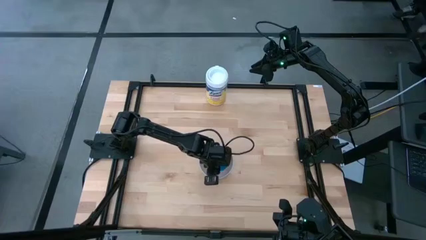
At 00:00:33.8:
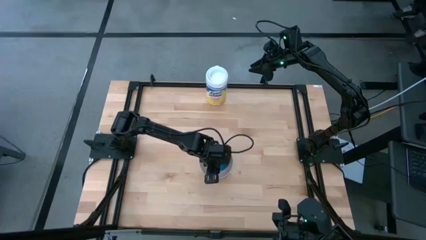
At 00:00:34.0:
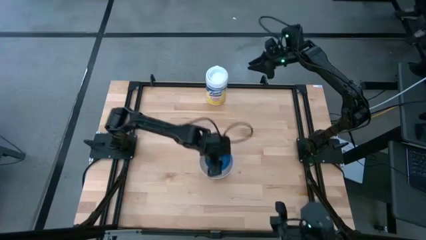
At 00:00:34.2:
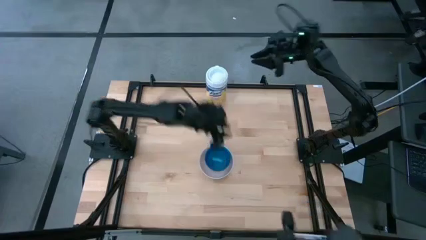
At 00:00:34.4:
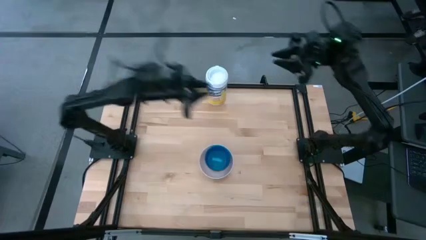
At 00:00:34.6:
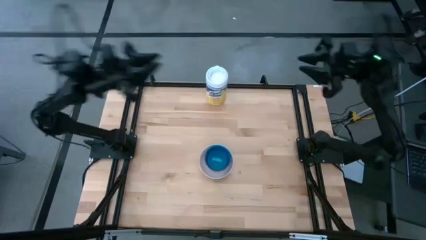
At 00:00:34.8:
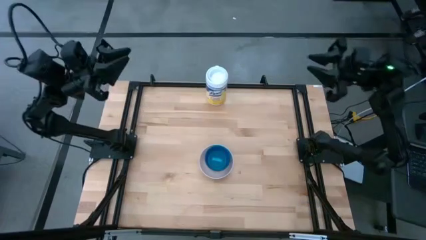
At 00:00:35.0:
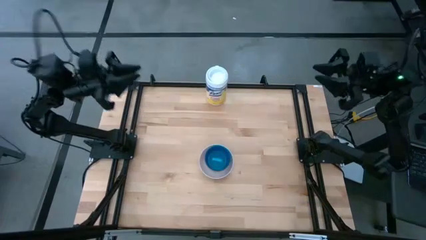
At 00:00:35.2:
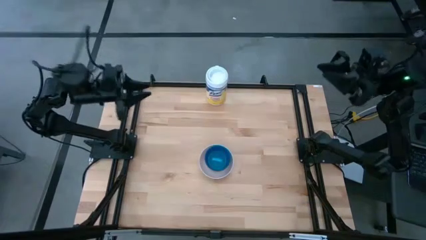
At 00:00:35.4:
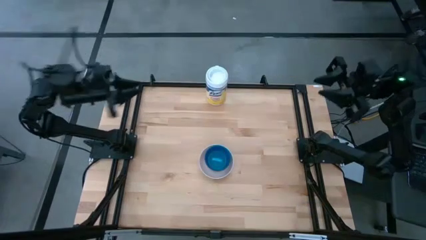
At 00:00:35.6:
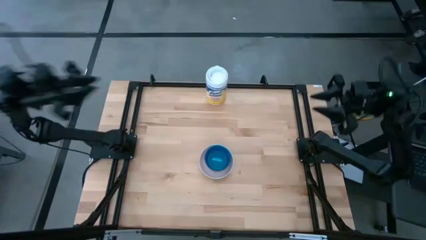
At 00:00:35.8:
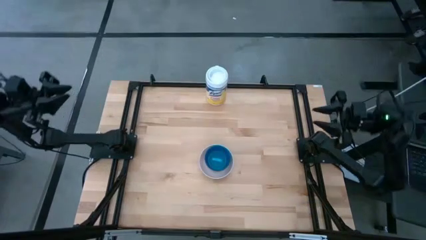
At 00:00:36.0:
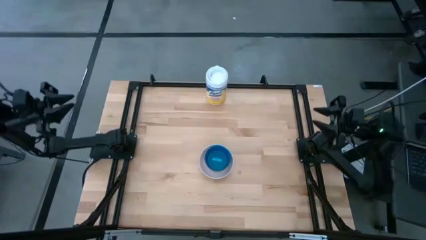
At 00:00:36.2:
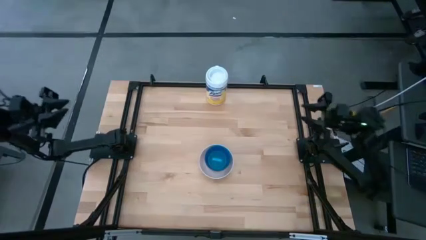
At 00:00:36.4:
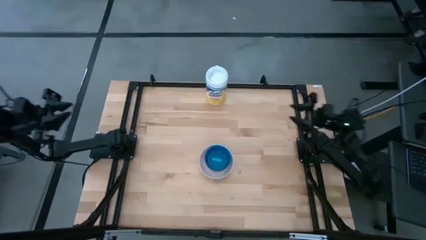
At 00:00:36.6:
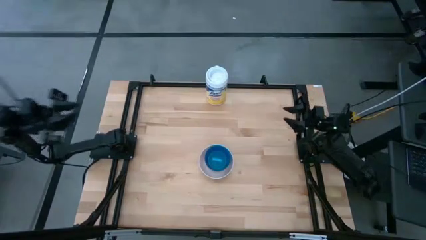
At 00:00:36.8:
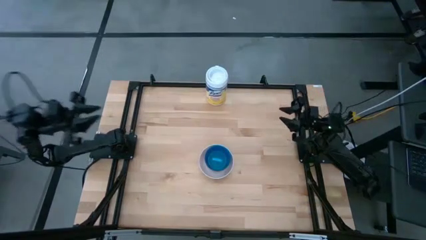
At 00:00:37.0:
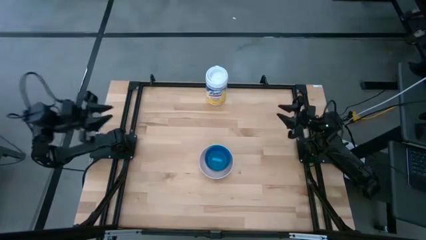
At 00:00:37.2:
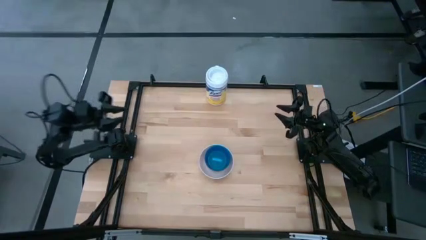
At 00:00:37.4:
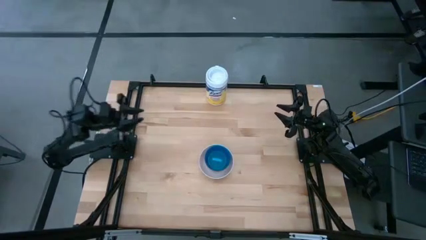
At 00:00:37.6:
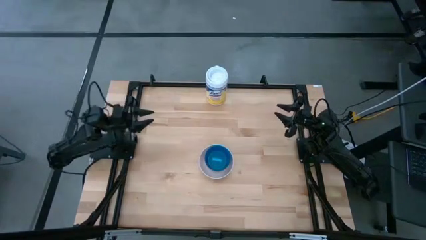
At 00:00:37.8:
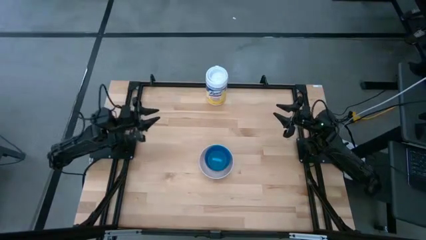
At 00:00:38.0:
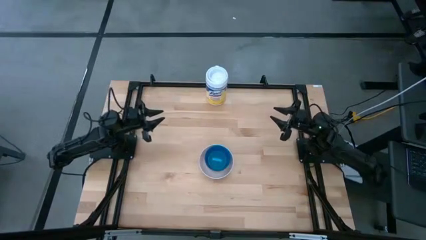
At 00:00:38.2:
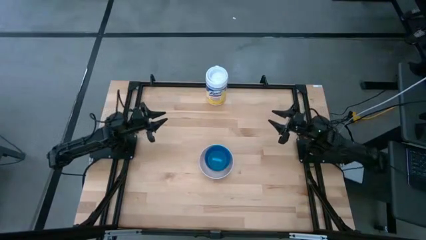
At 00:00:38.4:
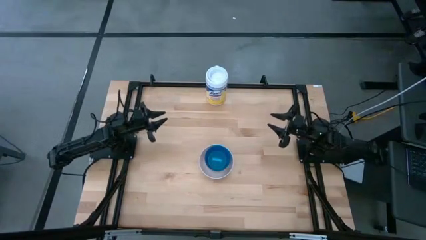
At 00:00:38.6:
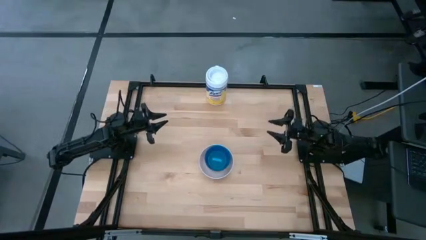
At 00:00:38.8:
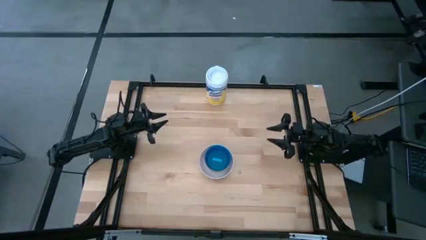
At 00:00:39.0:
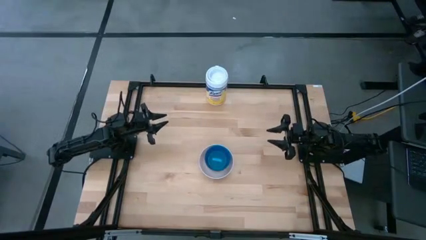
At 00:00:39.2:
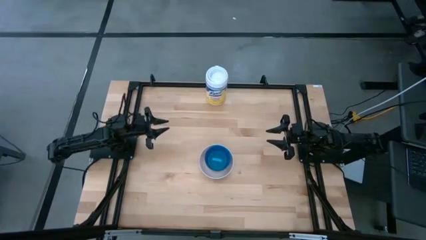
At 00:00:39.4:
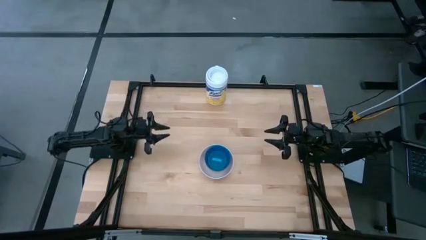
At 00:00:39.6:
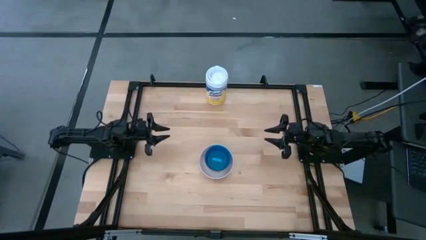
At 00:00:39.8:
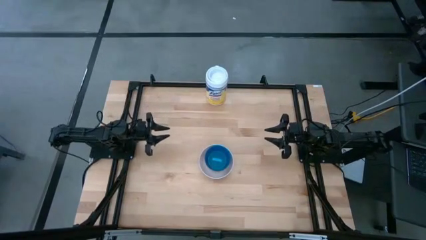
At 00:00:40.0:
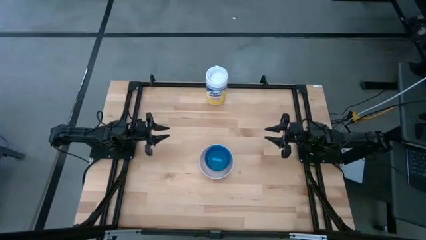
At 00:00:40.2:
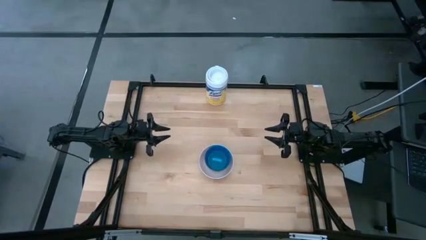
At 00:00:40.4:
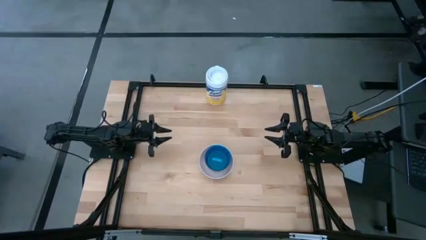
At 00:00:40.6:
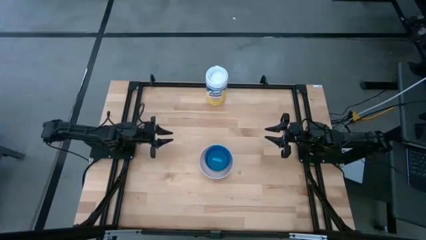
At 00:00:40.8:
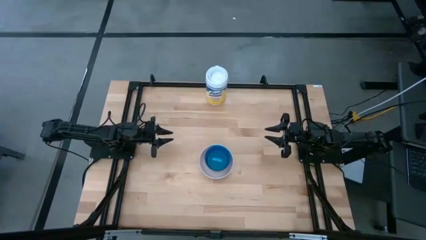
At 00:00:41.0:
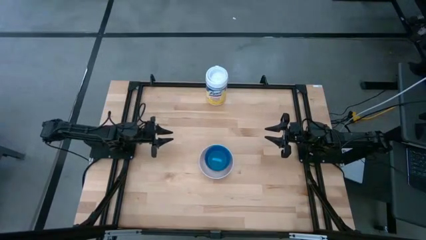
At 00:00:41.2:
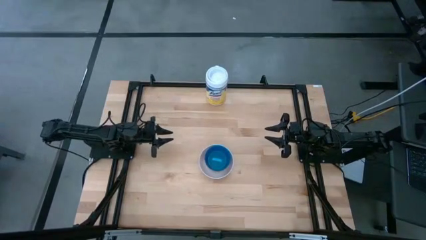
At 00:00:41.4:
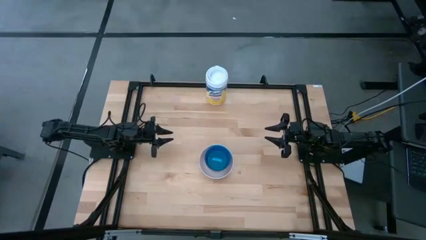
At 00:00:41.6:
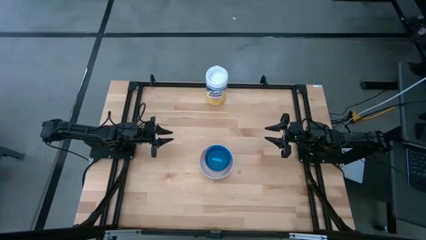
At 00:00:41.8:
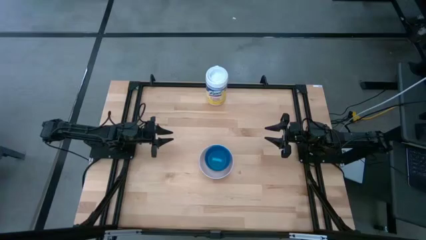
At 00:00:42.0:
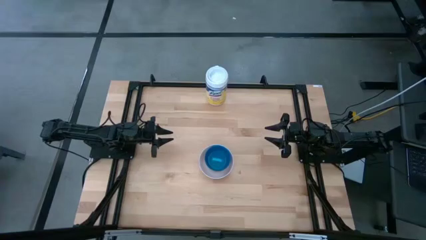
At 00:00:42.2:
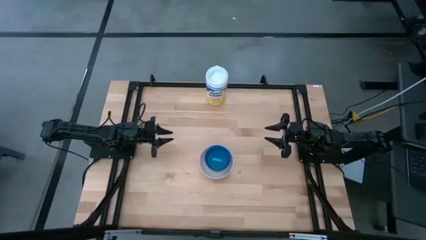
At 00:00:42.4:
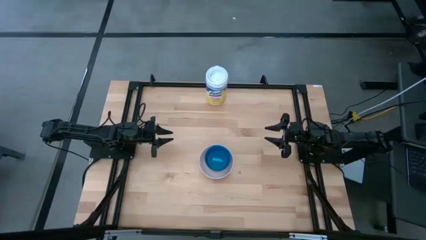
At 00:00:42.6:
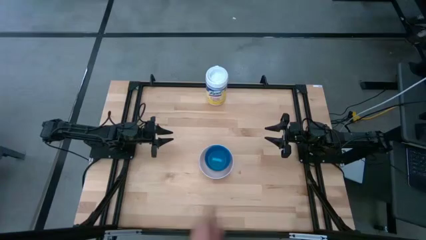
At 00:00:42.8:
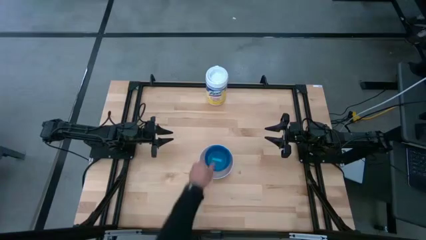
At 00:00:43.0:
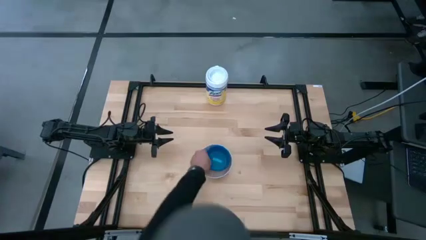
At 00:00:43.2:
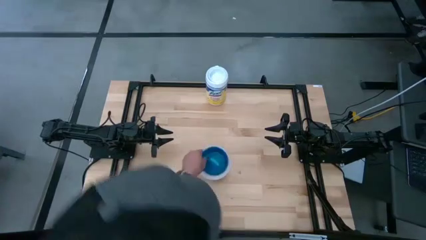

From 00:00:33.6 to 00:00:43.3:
Return to Home Position

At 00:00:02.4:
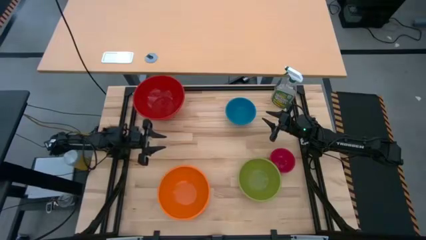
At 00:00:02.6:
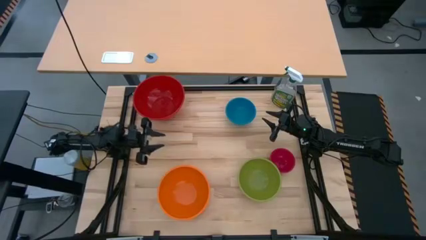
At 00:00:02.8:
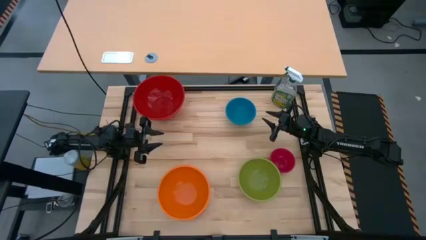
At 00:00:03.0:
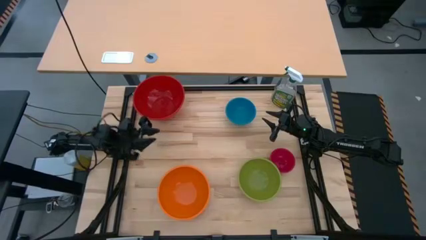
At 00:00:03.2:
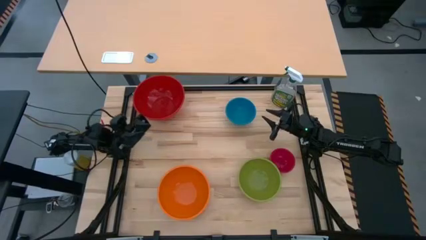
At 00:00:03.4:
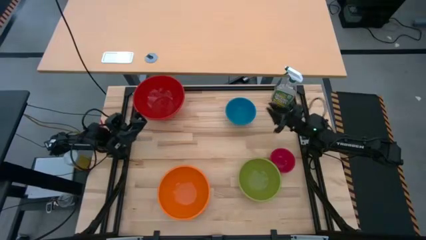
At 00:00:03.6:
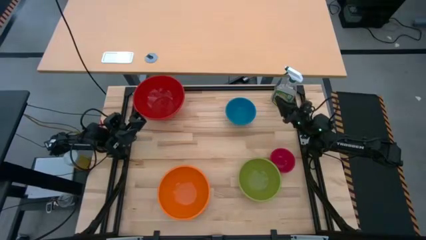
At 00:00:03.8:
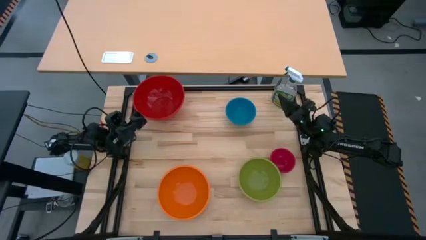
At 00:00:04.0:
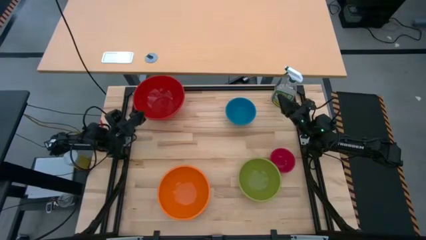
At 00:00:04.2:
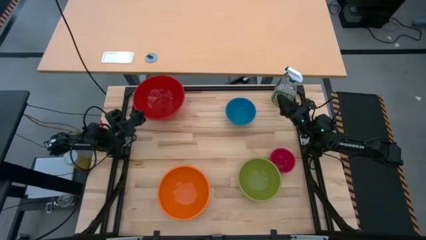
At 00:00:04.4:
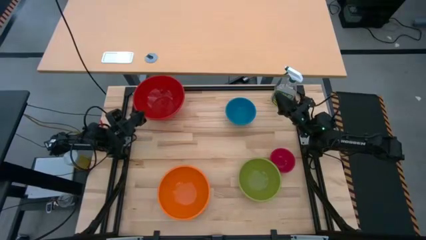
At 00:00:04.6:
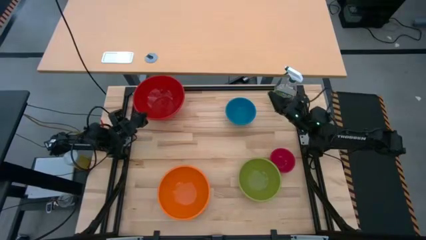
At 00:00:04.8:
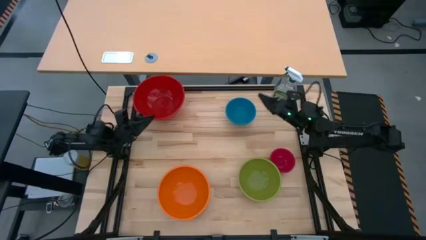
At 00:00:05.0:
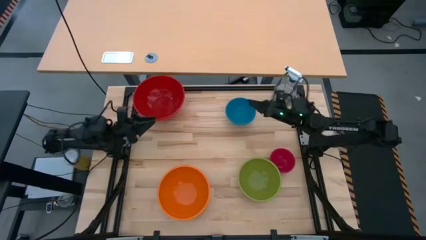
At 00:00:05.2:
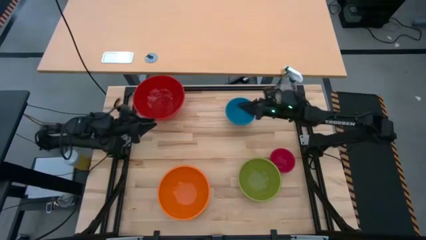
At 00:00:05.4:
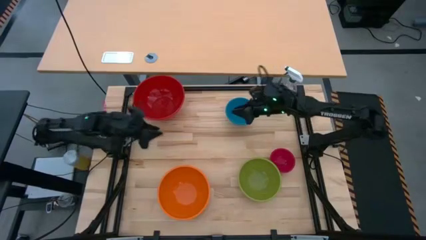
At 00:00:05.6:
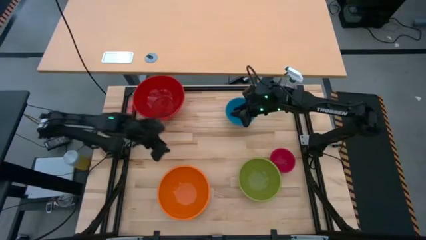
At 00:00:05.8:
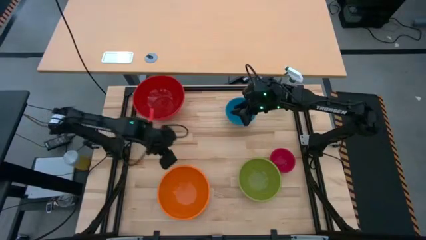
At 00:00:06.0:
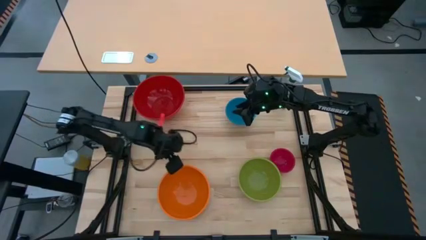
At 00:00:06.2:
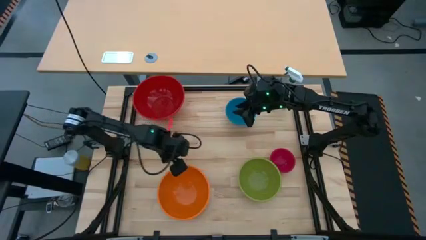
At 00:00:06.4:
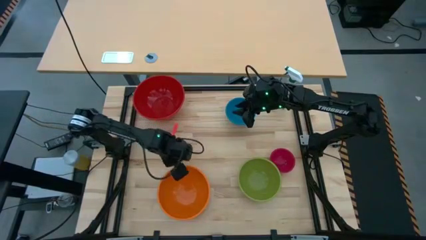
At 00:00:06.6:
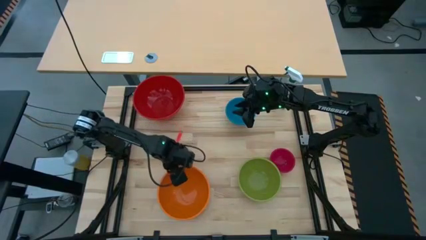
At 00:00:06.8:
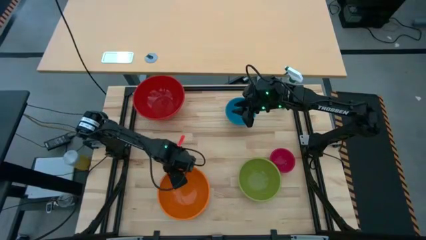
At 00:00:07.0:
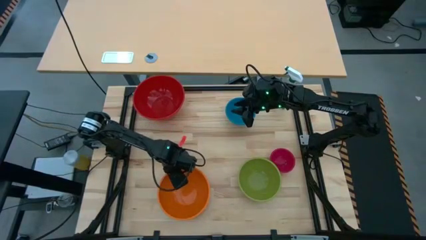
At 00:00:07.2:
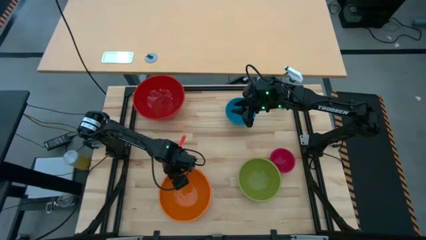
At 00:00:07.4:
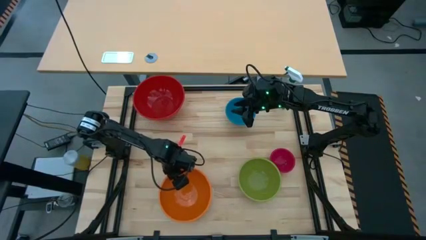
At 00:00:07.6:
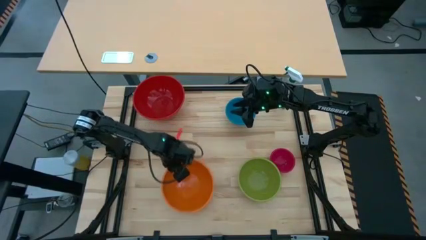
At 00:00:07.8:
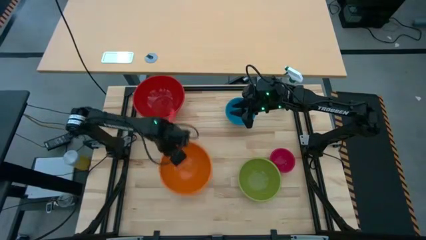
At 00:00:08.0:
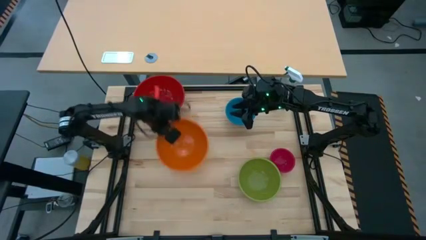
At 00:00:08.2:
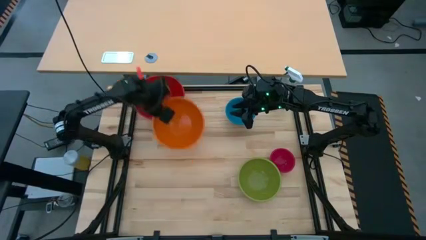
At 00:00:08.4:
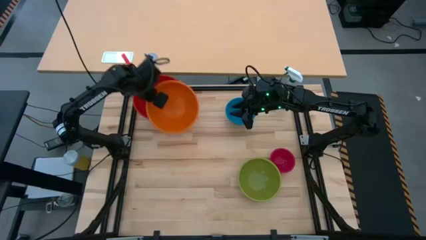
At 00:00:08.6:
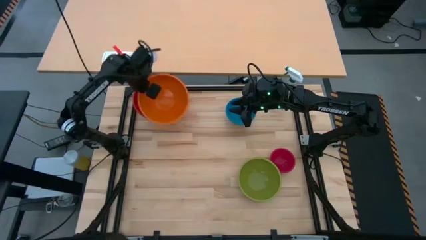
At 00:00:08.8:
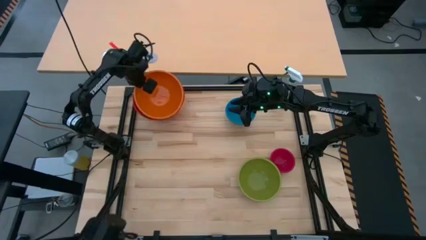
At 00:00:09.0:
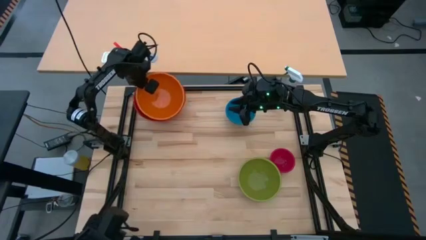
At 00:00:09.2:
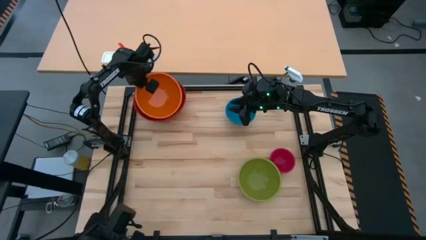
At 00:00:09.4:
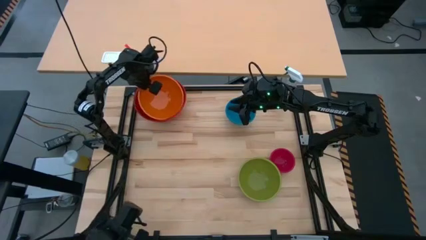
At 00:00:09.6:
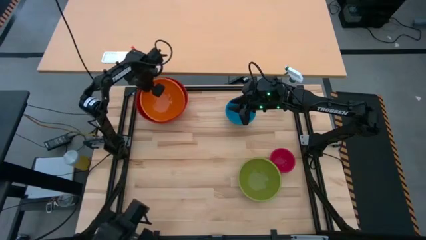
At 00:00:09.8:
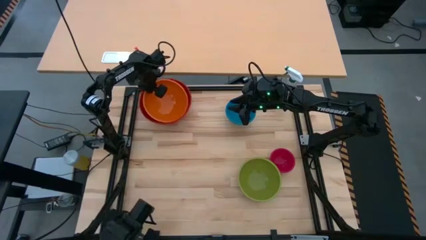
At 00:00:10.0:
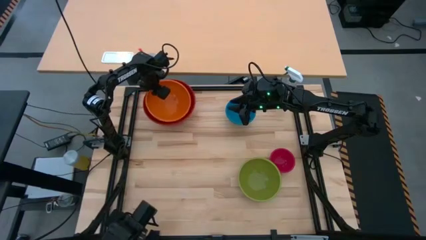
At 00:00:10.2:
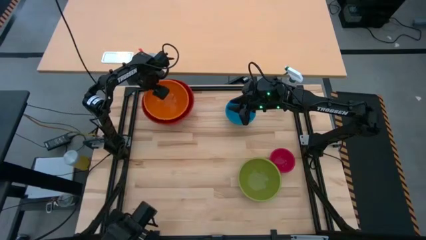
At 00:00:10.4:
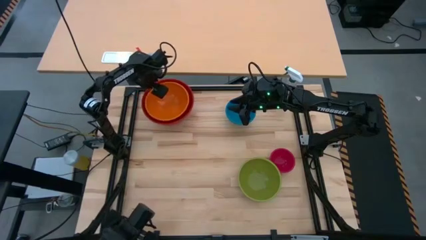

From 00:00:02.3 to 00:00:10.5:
Stack the orange bowl on top of the red bowl
